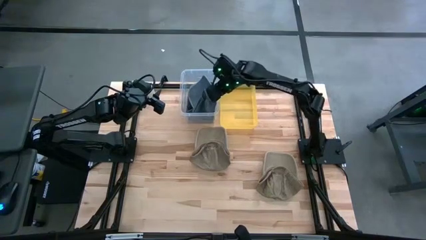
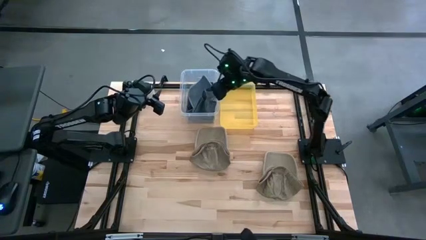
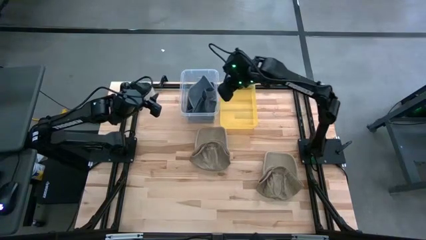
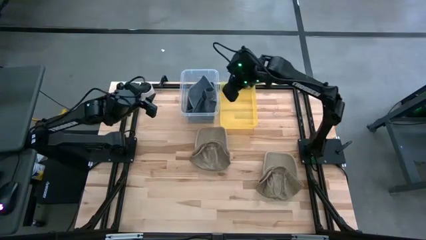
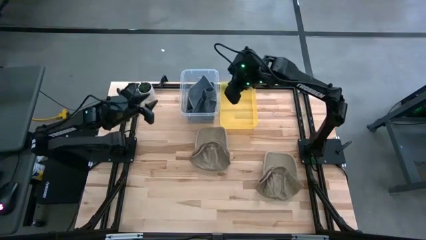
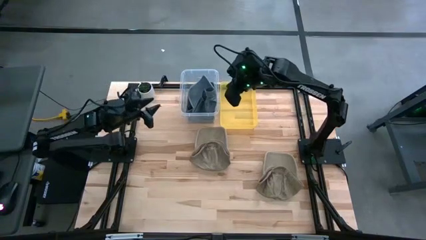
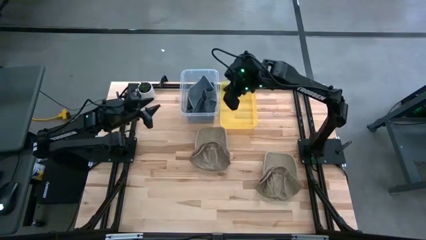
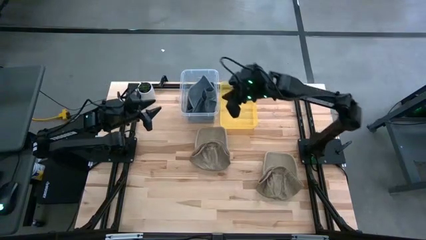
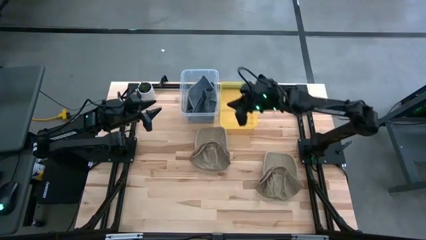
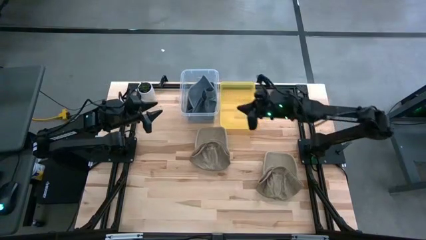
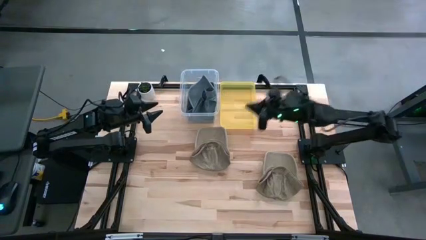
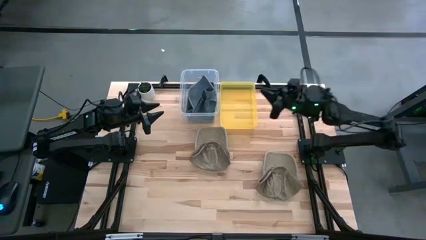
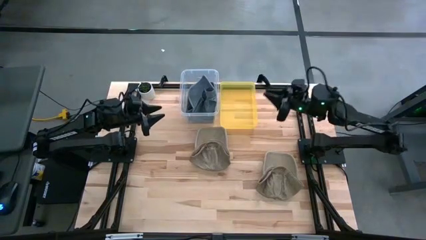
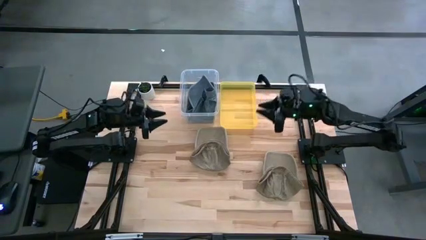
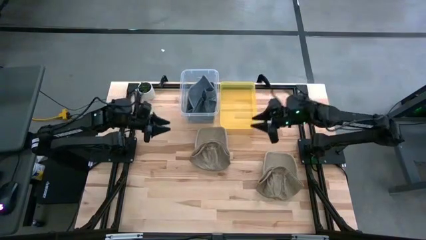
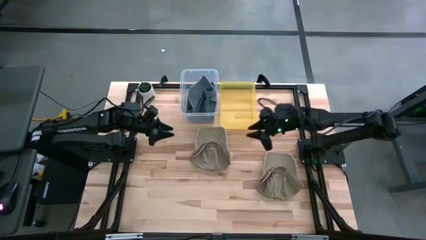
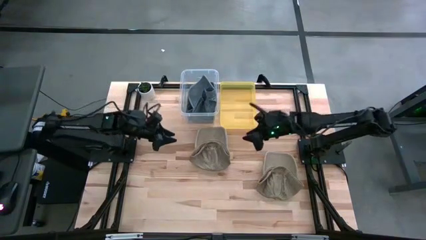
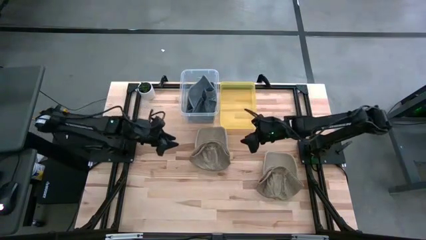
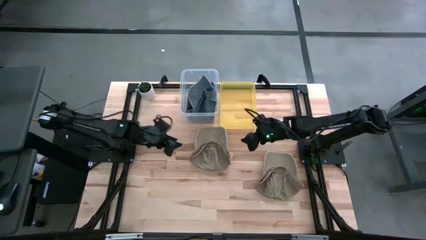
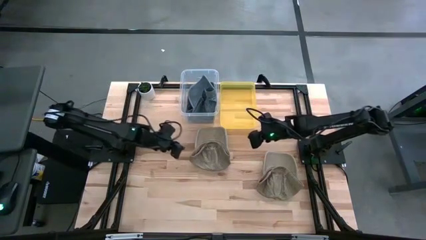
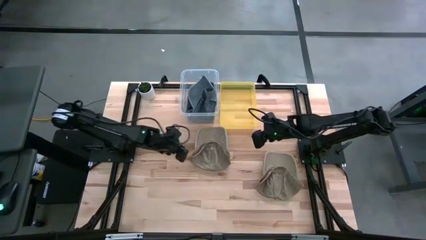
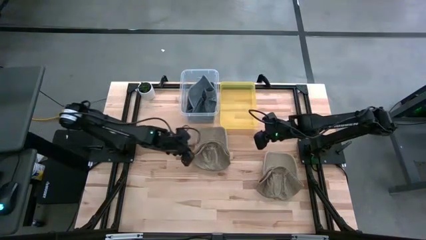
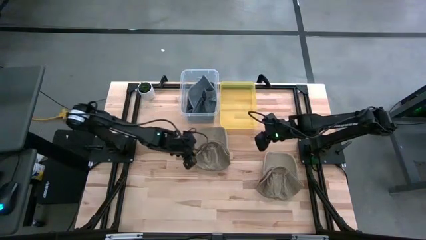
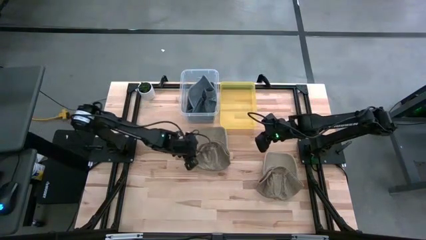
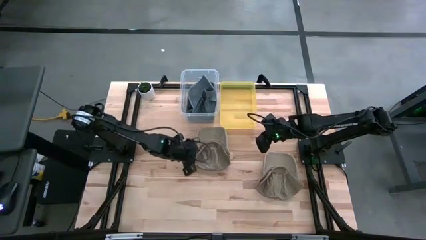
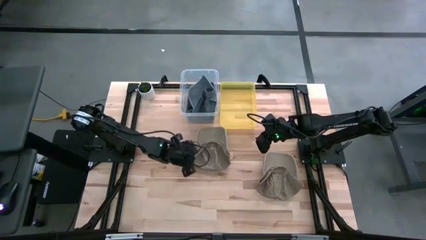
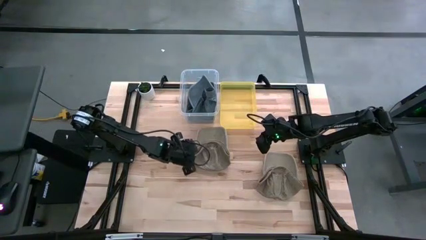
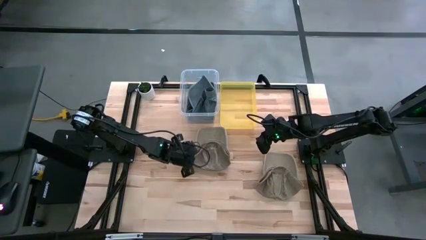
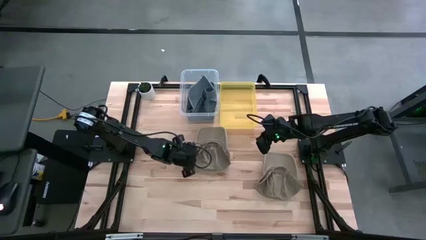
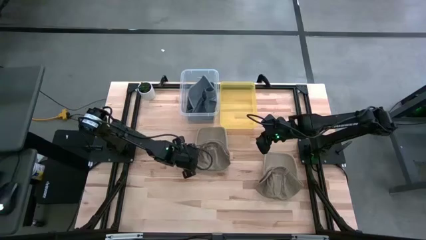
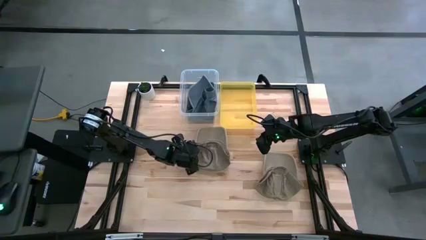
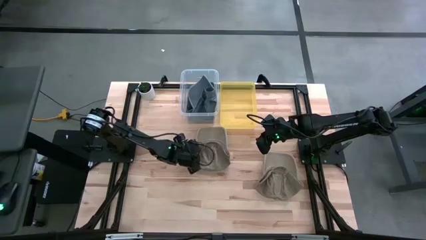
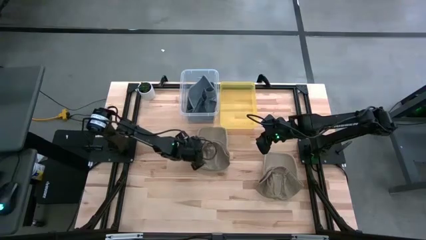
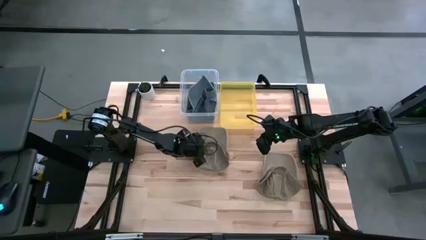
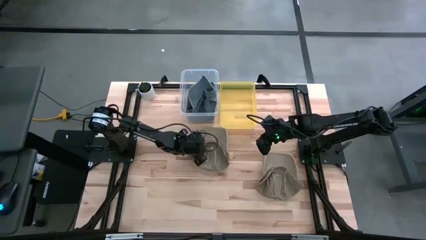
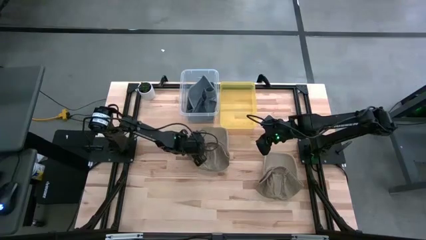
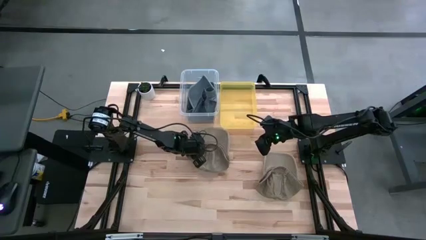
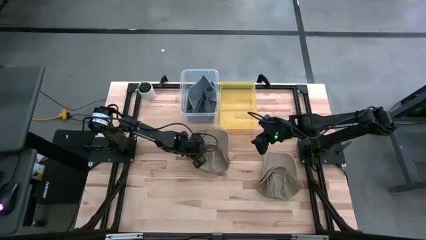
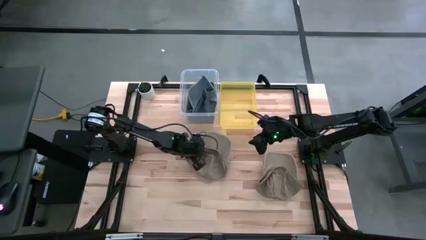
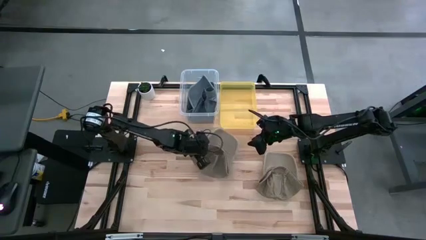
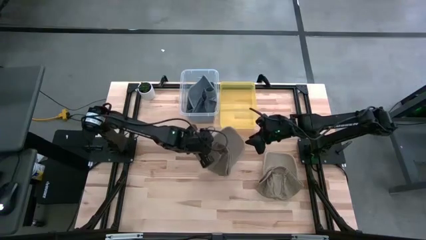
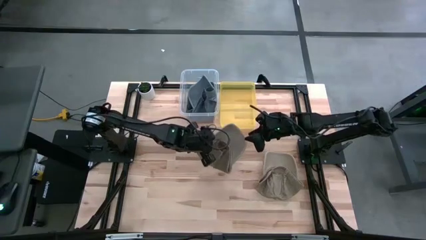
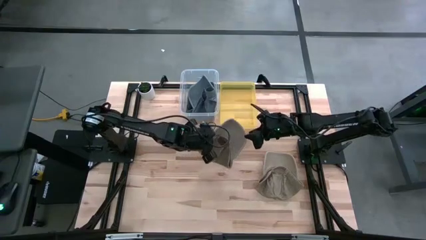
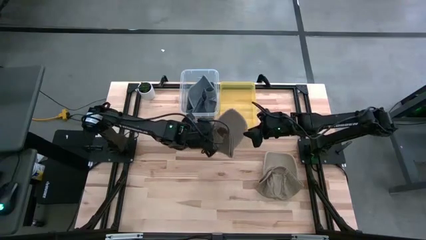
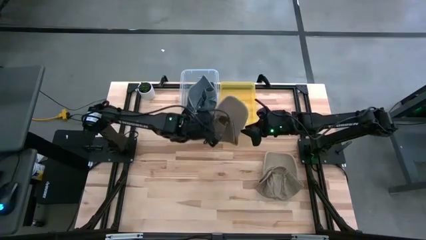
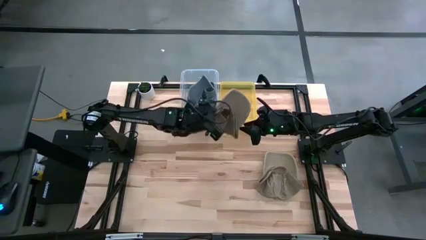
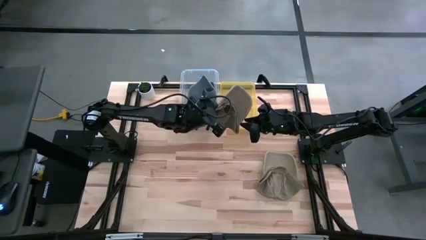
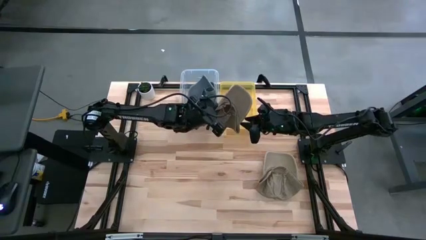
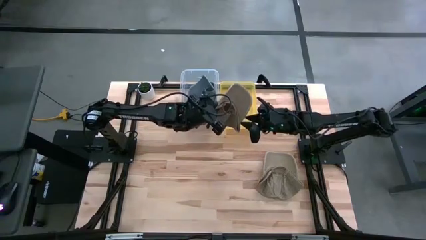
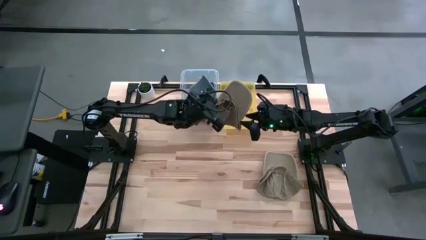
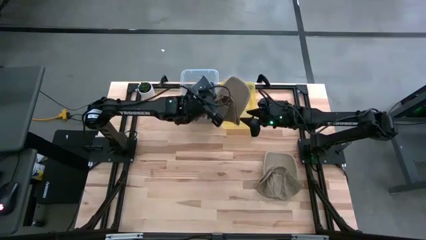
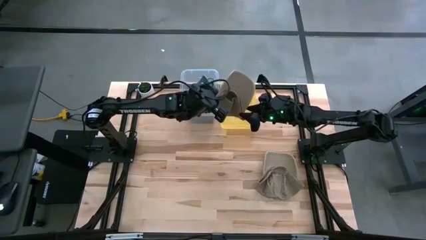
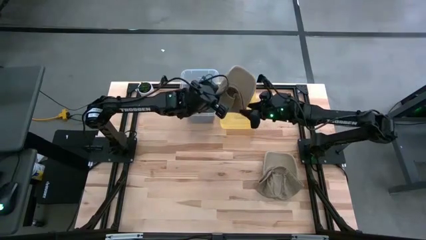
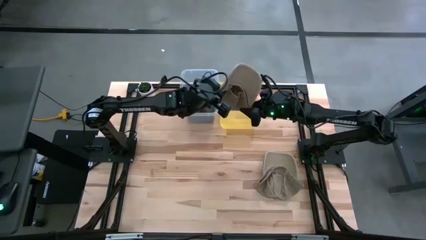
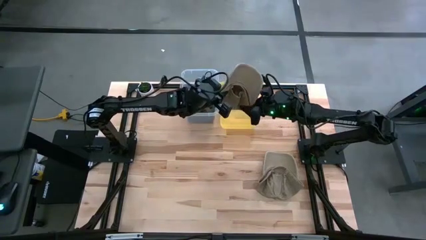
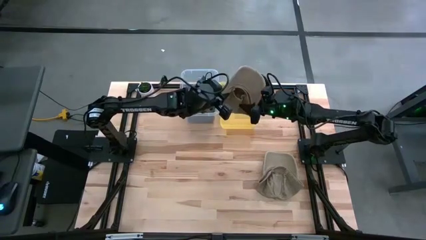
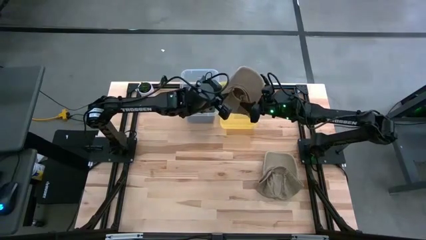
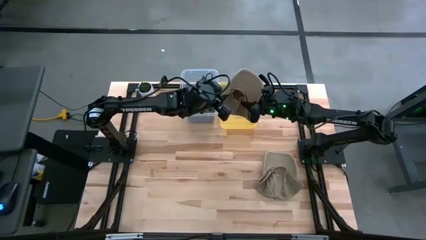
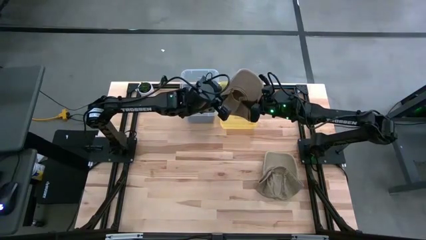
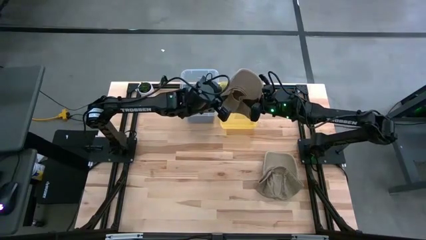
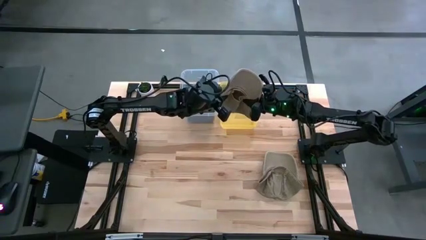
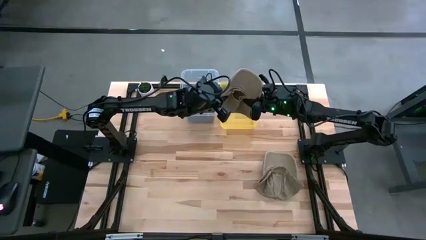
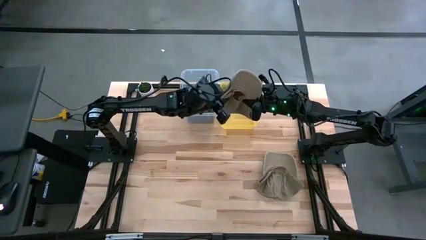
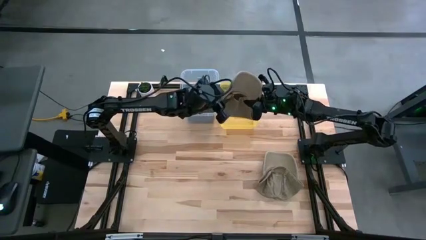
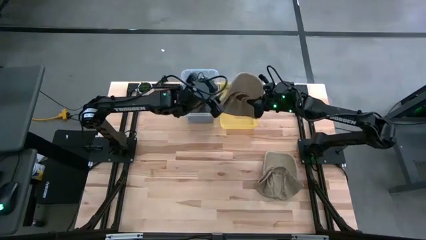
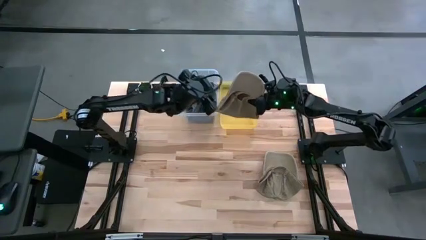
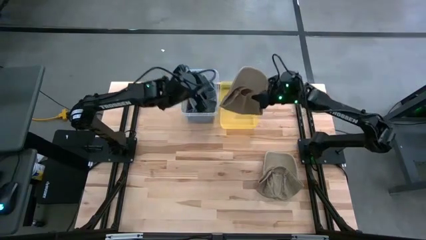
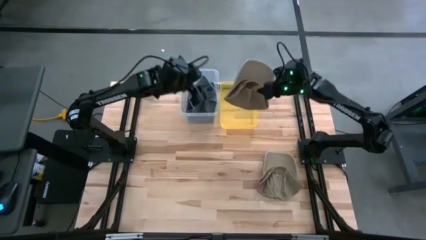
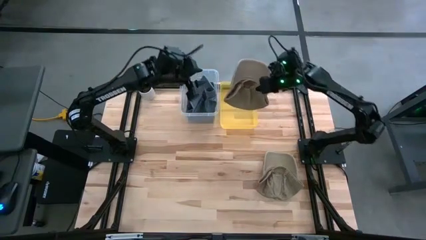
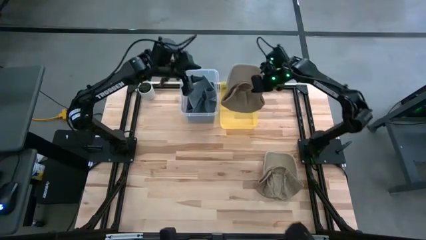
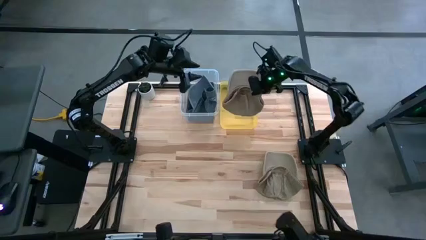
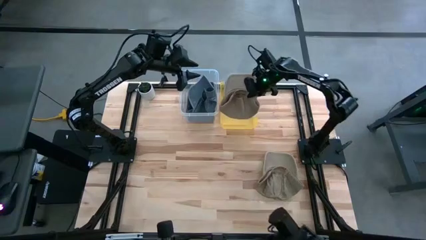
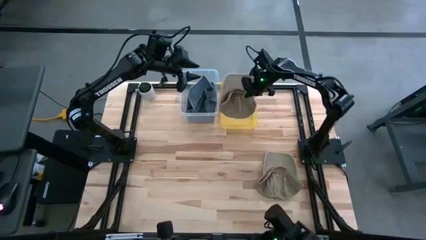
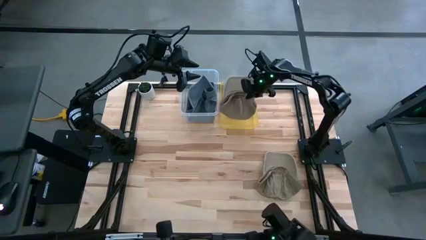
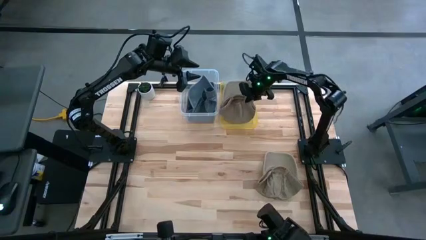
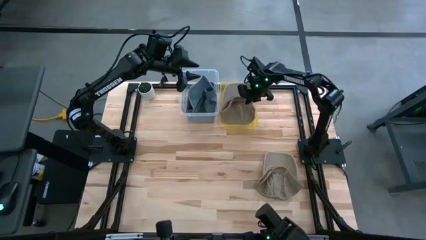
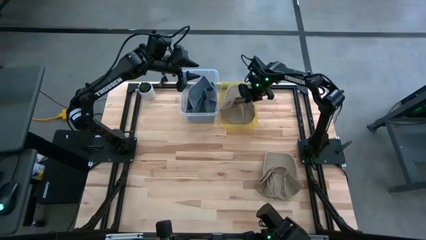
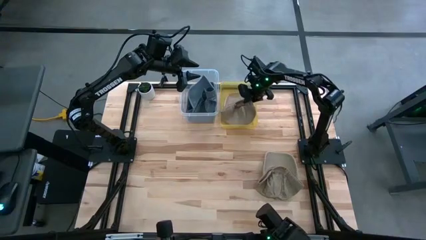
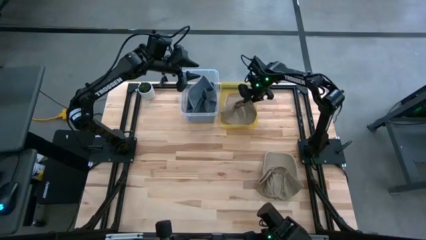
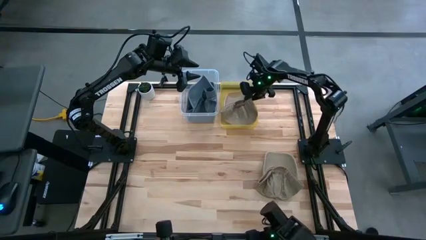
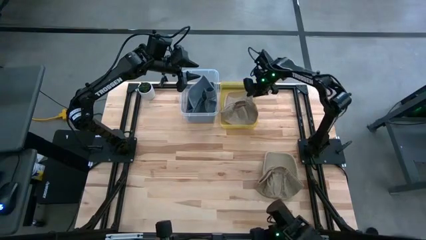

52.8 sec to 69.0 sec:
Task: Pick & Place hat
Put the top brown cap into the yellow bin
